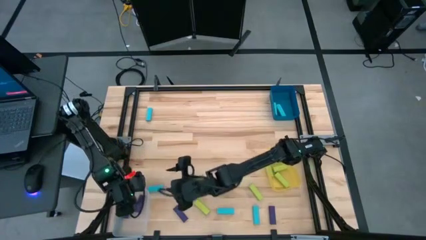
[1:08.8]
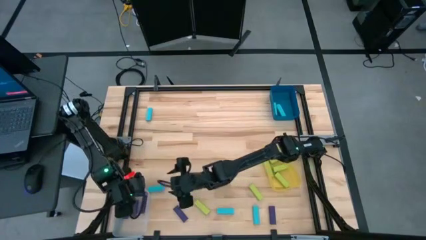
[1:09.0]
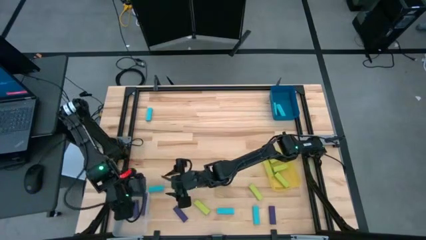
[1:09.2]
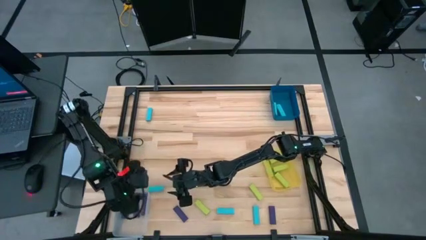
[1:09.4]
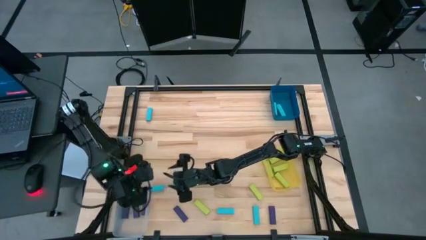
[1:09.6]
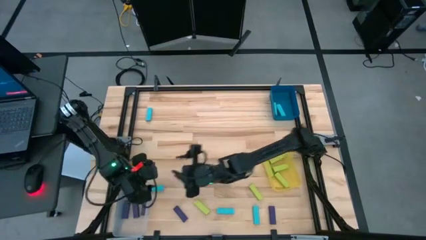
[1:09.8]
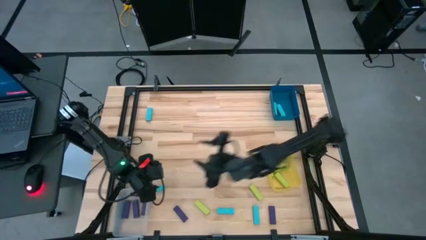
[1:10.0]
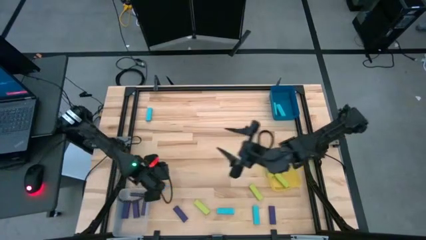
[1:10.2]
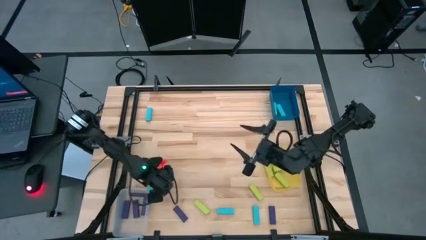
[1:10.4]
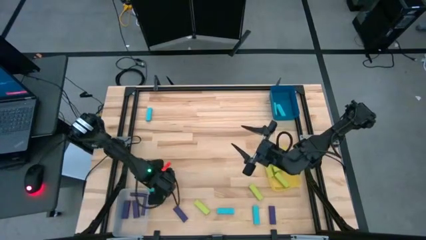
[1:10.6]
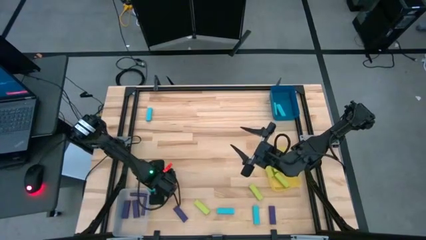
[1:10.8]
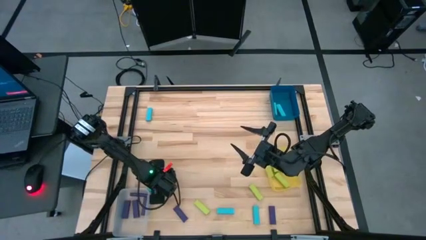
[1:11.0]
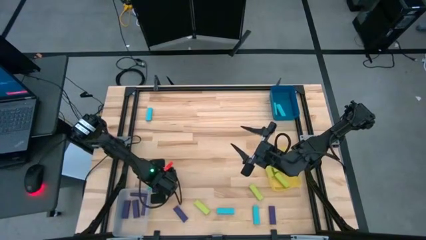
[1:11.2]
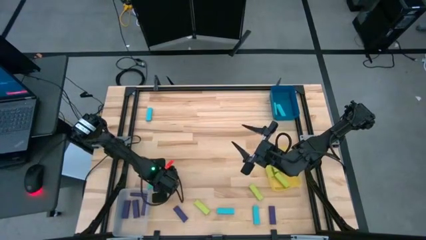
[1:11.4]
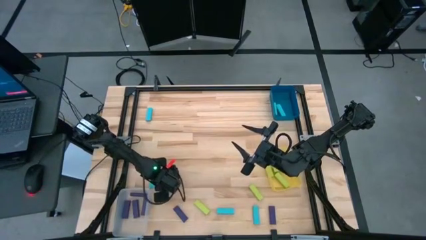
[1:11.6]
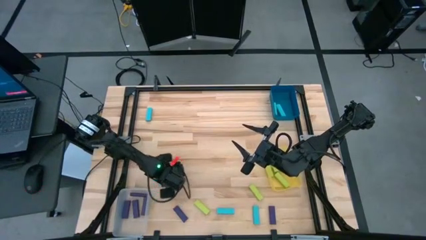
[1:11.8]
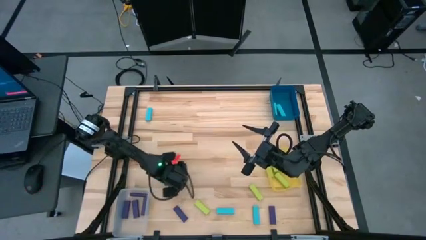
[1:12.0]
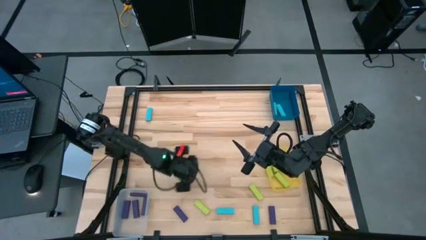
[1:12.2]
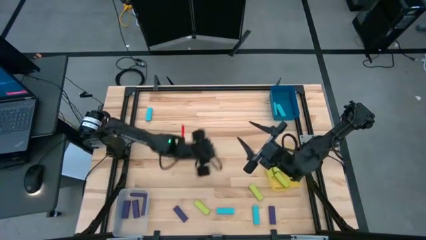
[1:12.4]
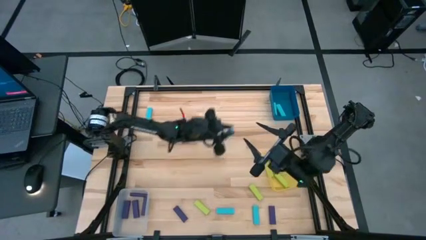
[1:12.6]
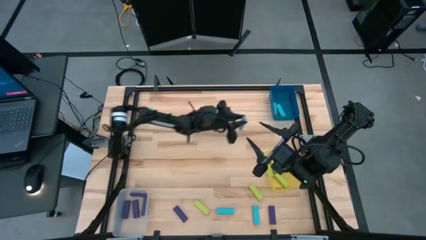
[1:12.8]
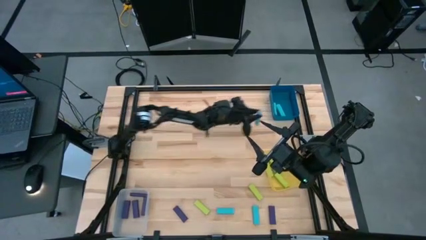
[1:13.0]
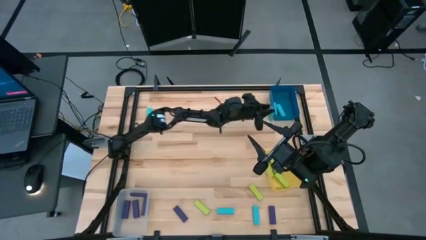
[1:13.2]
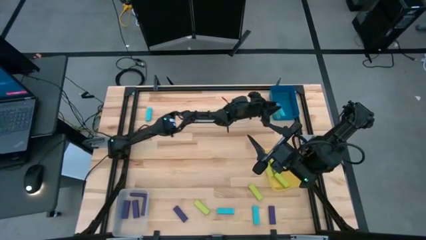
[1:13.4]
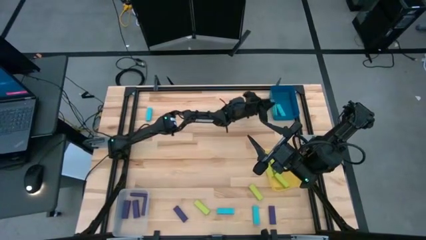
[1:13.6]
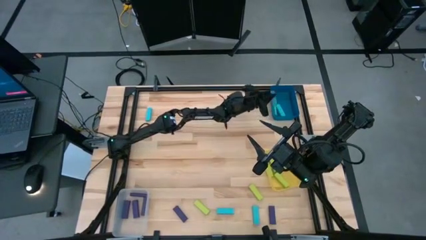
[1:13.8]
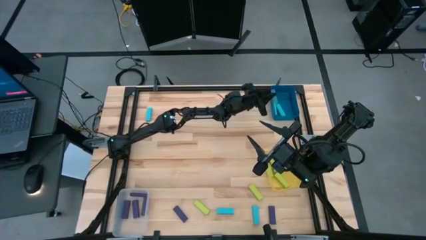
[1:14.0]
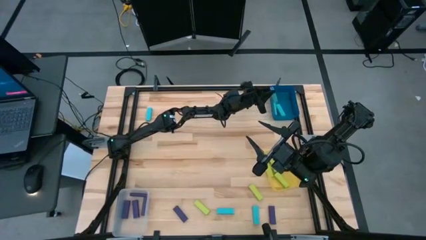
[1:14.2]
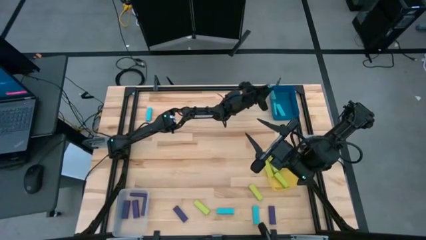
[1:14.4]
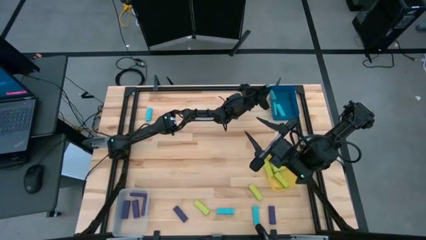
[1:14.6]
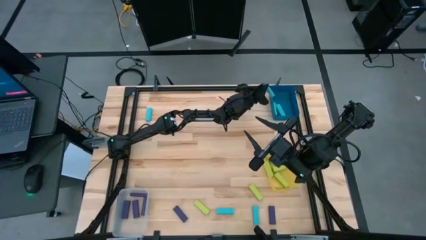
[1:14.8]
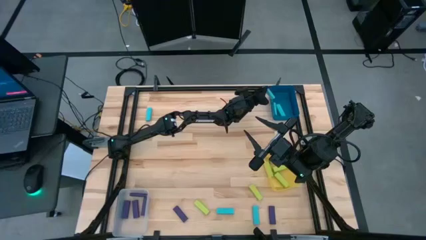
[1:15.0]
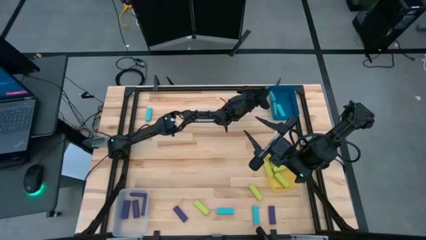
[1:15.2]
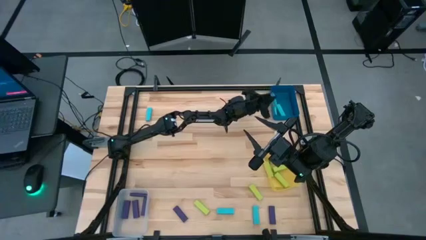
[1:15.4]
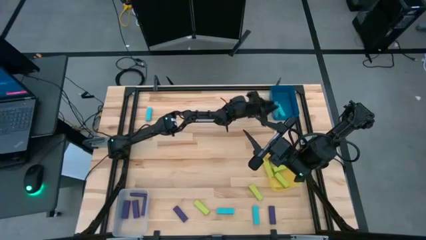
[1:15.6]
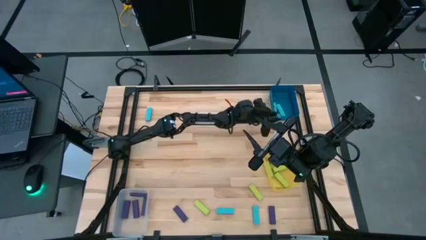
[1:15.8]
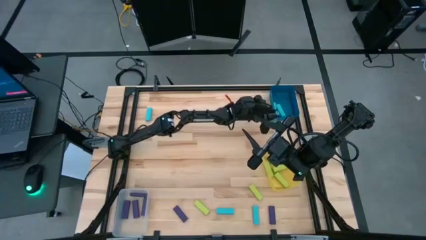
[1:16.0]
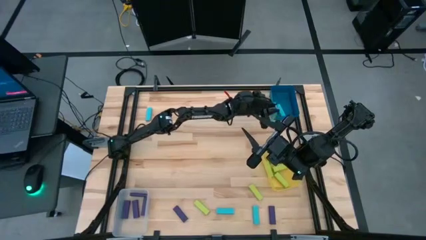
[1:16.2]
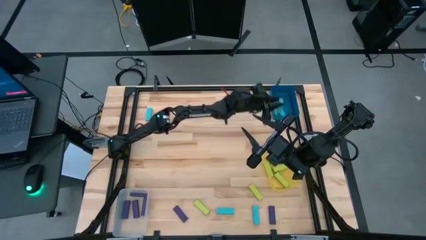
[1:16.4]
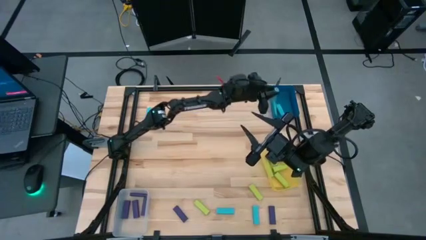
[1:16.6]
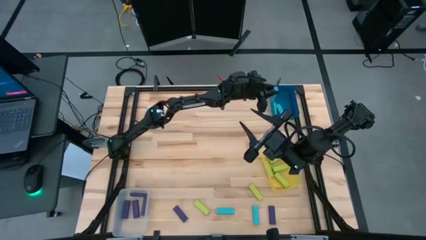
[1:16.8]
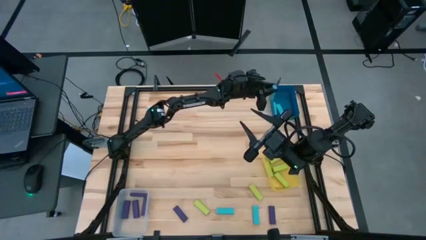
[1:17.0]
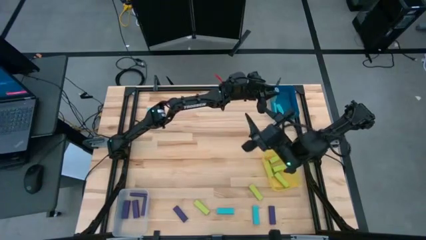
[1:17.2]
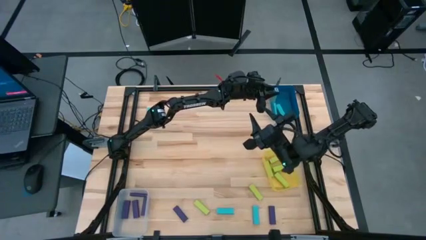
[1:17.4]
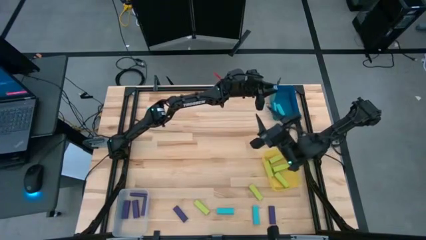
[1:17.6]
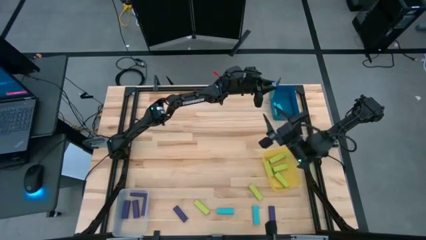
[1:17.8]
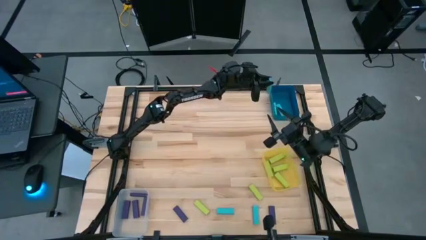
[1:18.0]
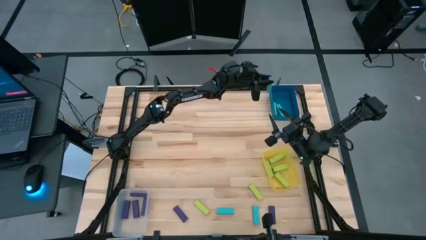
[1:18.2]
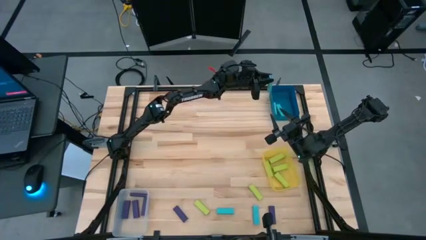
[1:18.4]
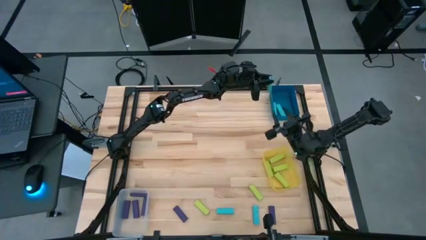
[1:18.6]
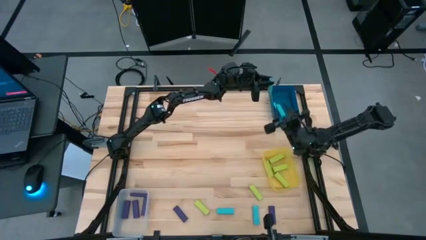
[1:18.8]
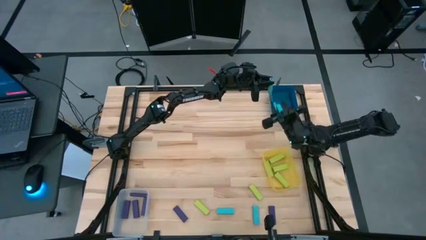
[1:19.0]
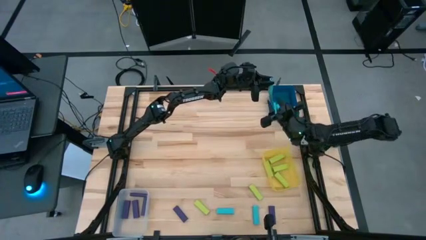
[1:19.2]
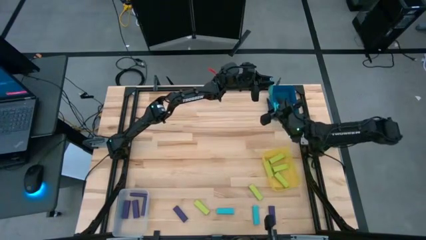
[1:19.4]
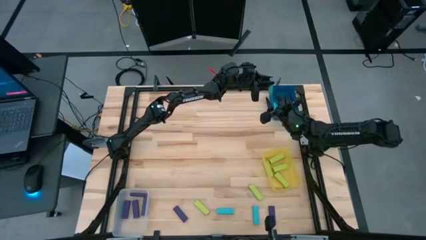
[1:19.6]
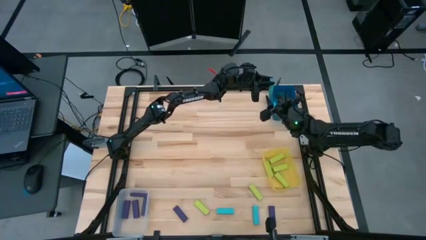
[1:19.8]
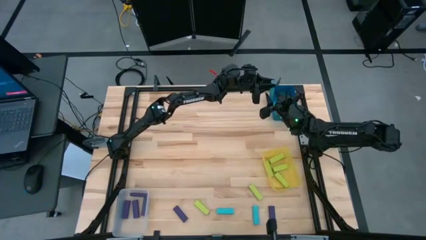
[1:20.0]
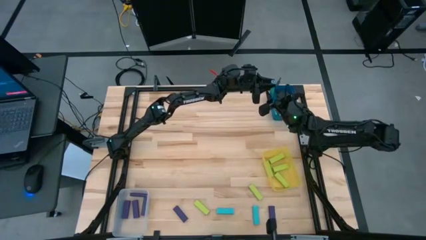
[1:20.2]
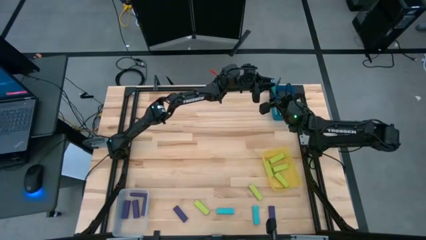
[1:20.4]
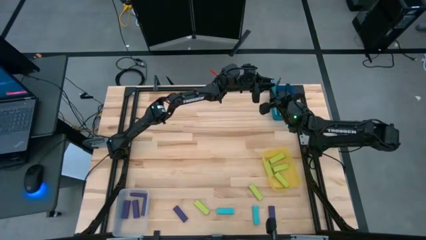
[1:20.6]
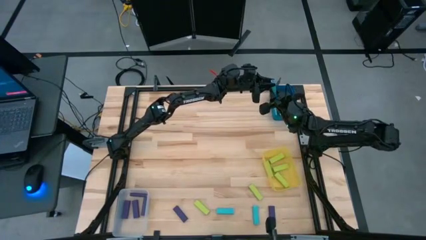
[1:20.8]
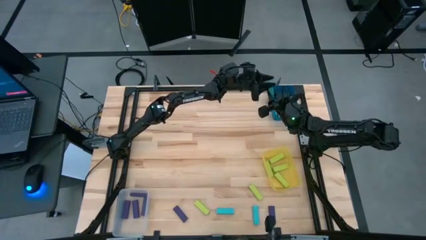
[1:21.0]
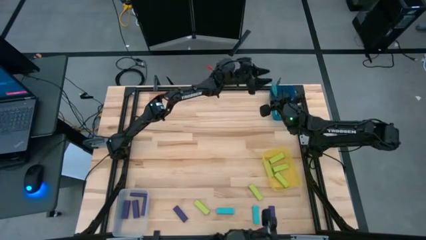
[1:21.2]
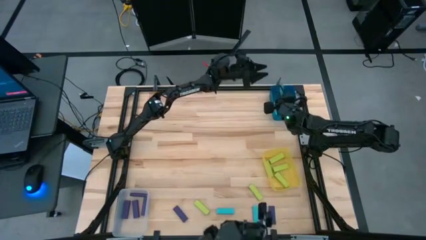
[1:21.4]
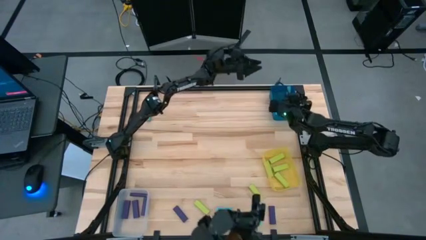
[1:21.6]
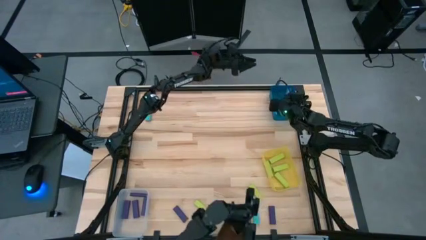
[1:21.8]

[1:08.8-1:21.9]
Task: Sort blocks
Put the blue block into the blue bin

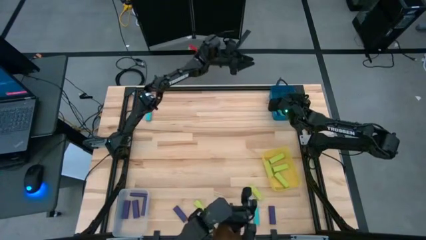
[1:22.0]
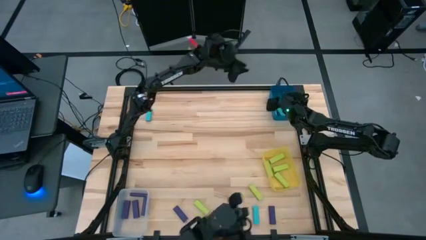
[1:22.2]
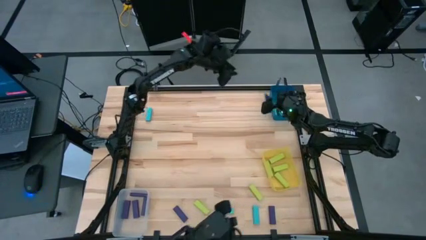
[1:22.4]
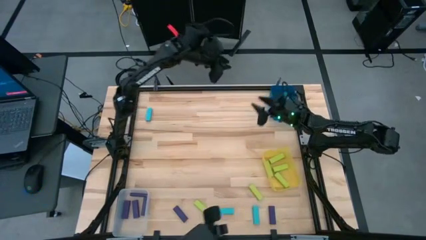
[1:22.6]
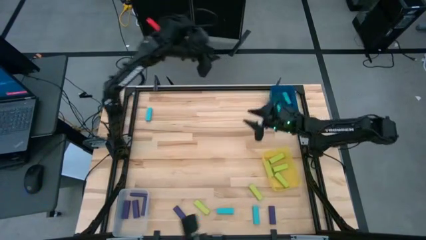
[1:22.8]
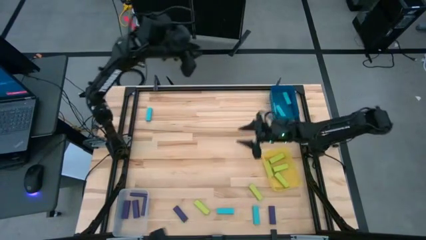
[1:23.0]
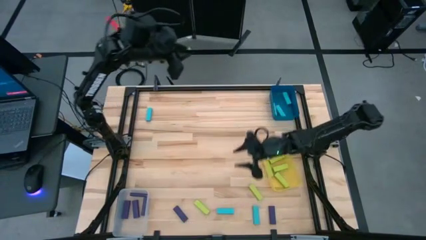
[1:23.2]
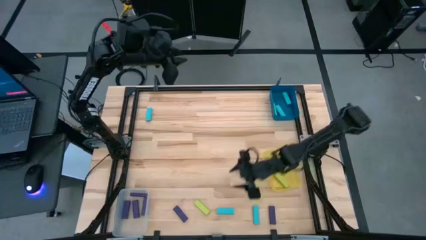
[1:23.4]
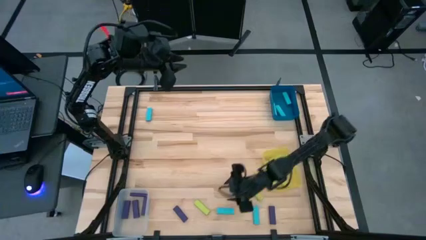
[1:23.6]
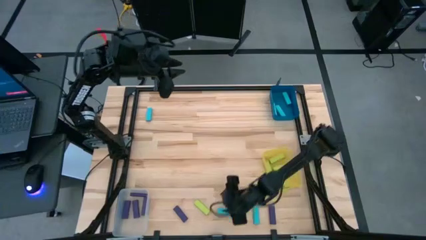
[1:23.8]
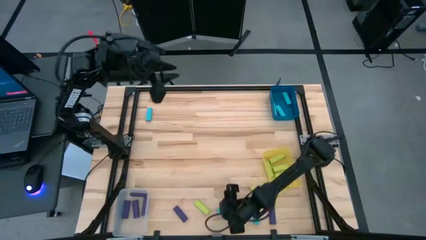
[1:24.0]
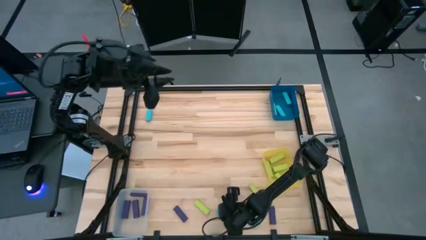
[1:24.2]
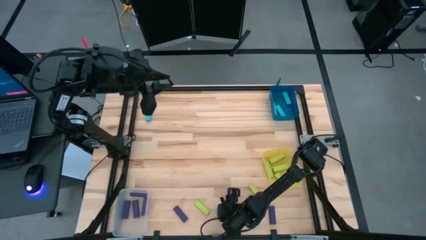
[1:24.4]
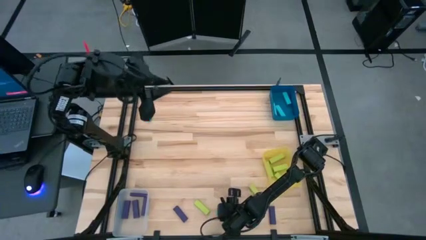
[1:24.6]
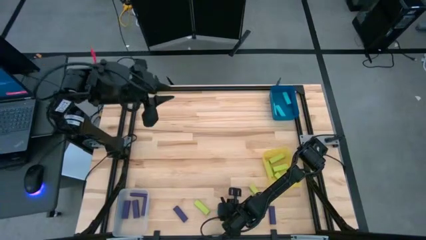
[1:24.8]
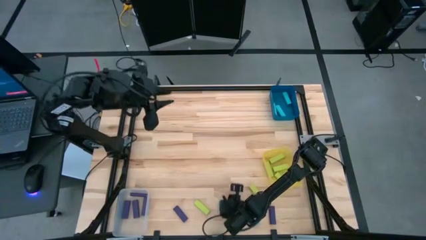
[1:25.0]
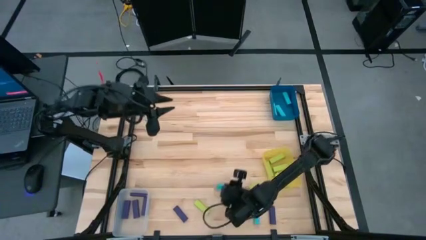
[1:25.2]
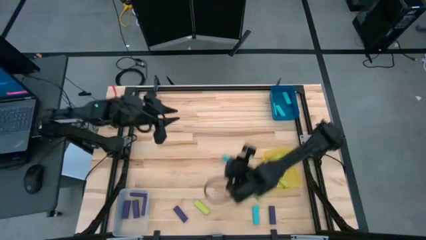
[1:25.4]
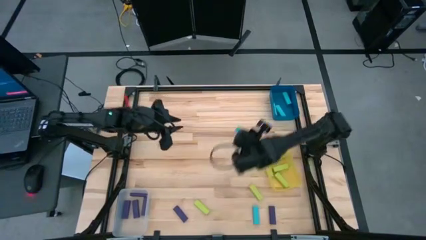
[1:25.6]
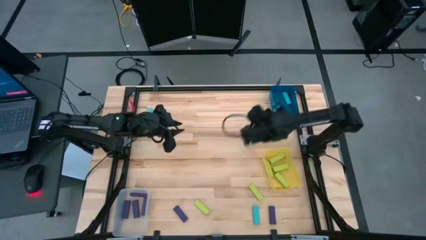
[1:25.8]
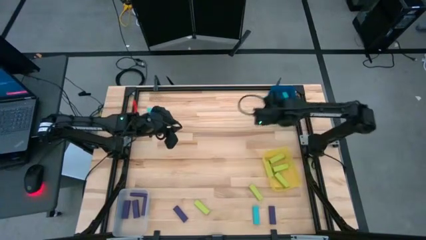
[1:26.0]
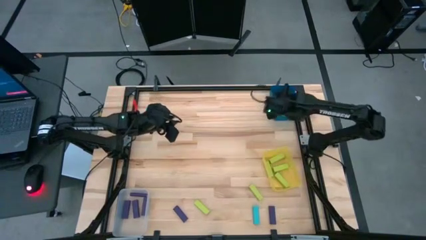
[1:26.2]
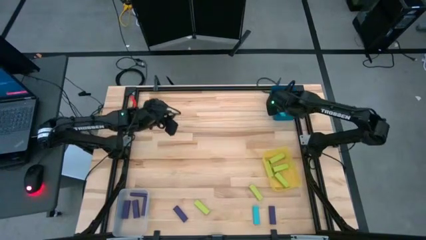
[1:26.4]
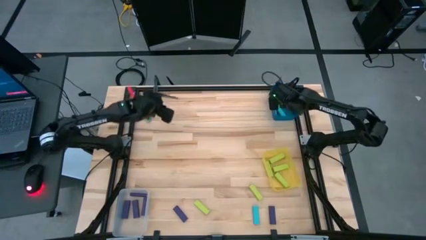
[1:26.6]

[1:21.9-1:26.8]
Put the blue block into the blue bin
